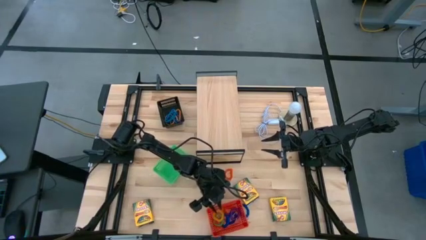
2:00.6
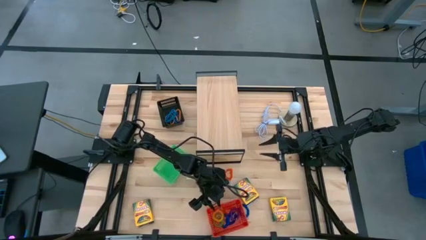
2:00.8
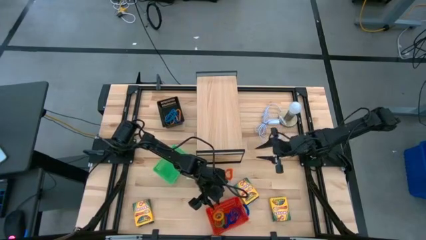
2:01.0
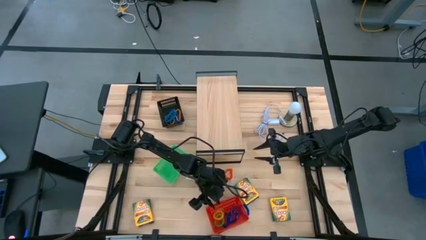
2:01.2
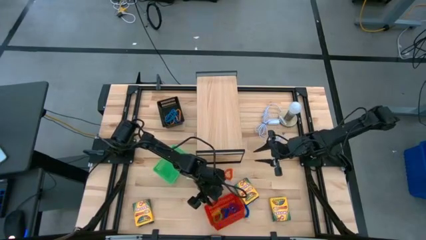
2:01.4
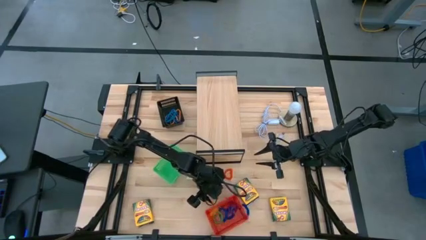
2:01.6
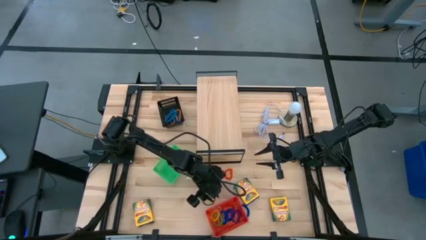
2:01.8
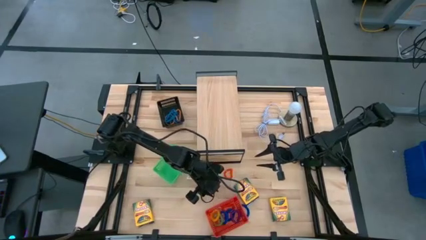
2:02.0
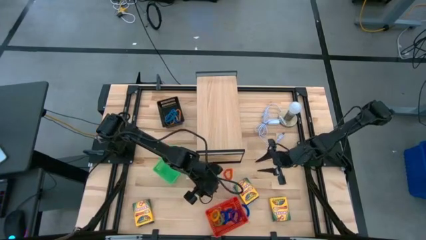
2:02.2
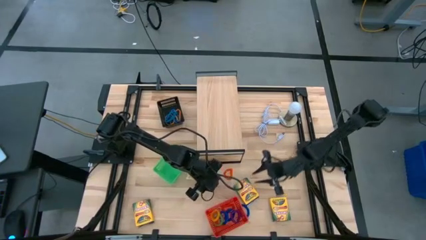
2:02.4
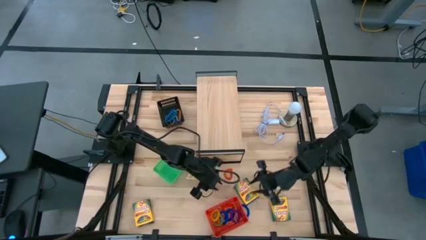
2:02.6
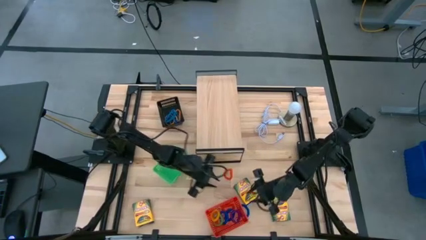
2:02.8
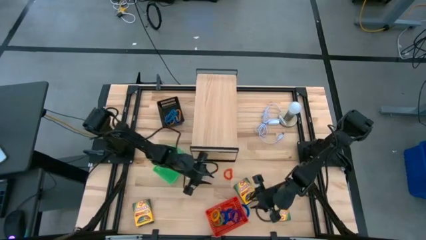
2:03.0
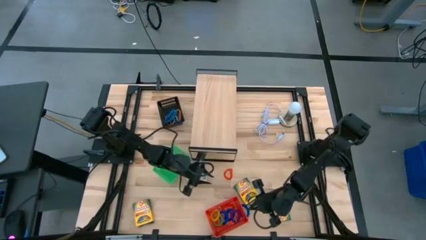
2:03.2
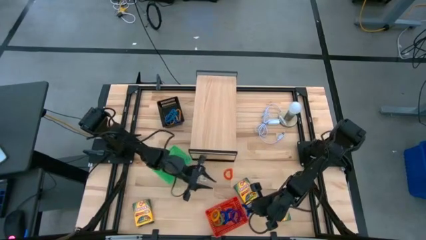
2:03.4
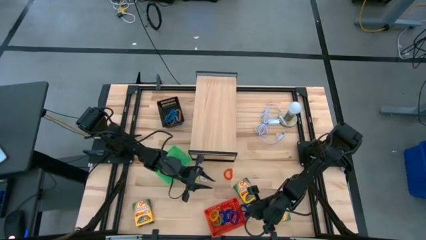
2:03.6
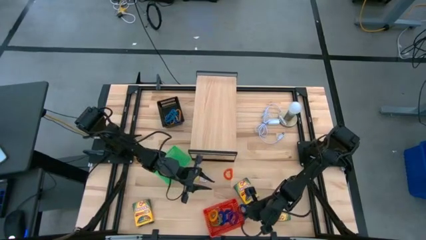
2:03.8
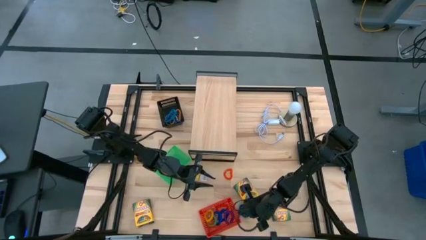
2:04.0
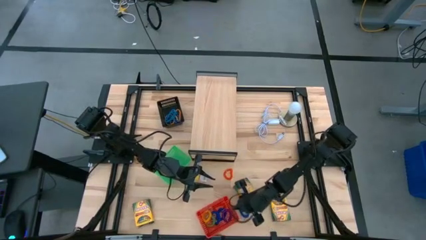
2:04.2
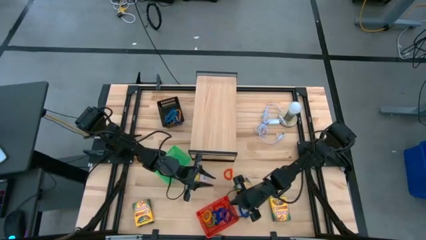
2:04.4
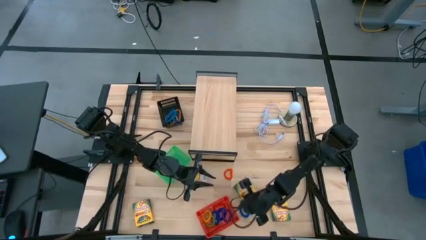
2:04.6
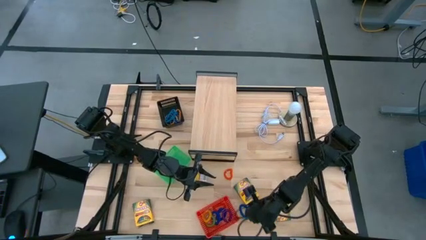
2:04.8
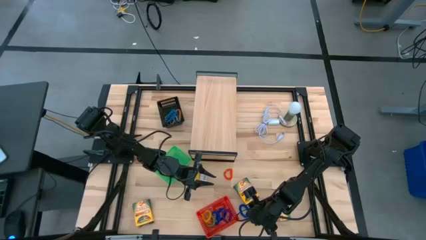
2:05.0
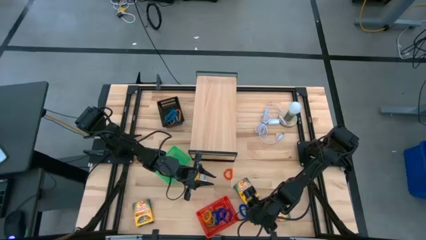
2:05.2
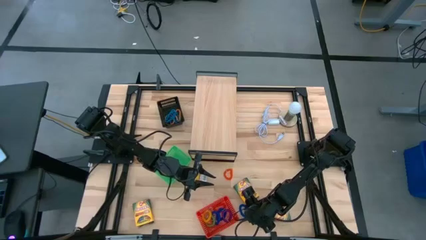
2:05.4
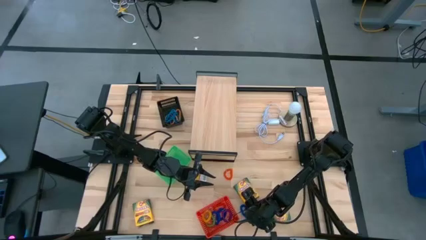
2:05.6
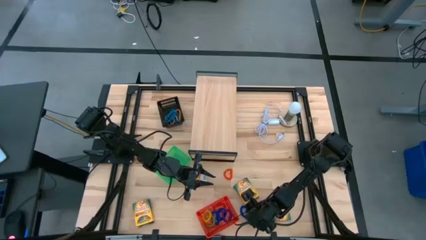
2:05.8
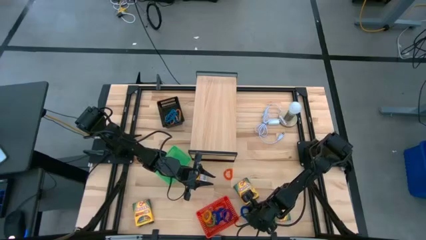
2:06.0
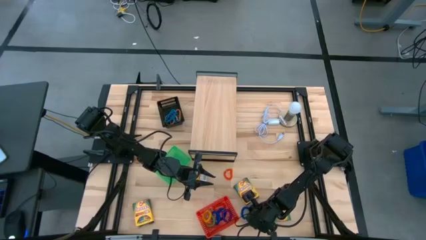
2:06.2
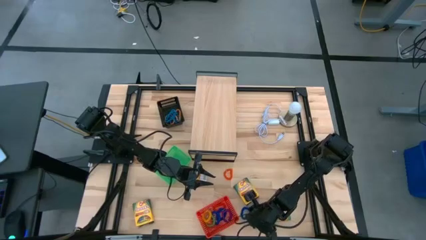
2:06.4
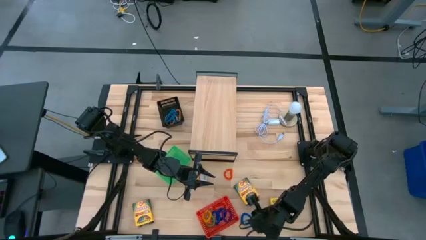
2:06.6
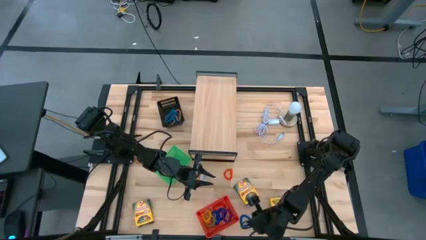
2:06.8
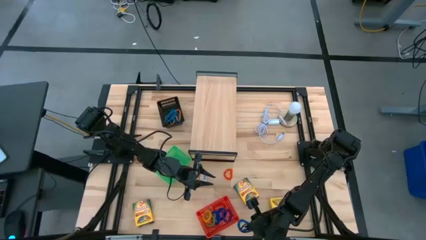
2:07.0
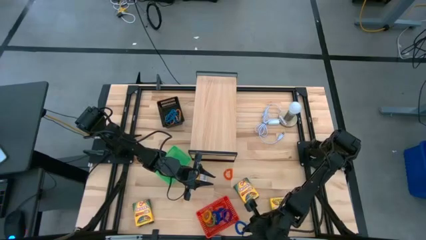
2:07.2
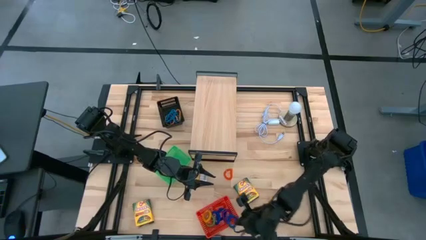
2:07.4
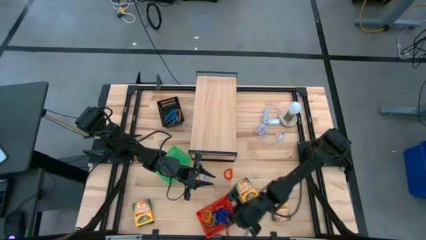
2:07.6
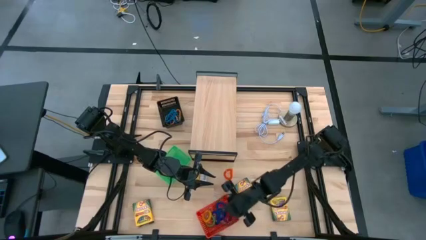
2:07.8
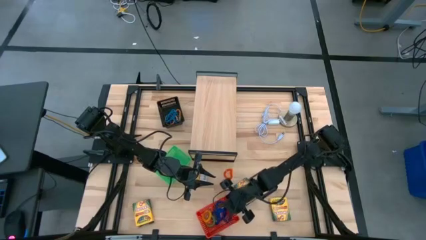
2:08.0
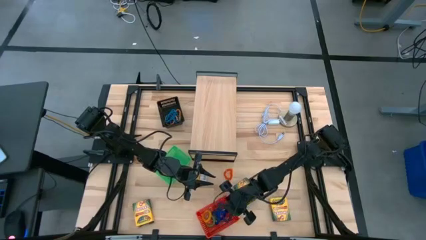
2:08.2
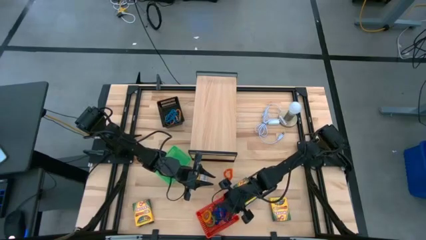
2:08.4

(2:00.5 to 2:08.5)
Task: Pick & Place Office Desk Supplies
Put the blue spring keychain into the red basket

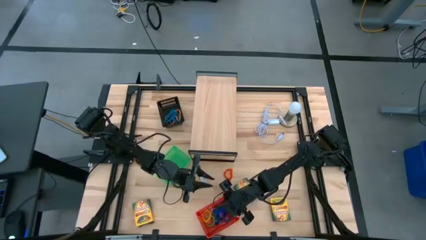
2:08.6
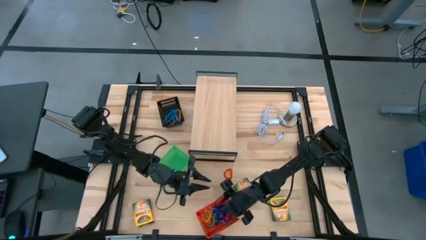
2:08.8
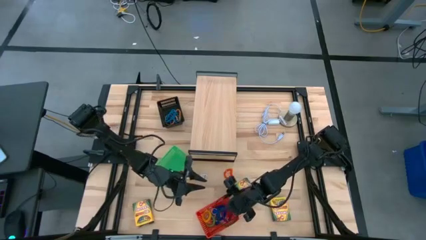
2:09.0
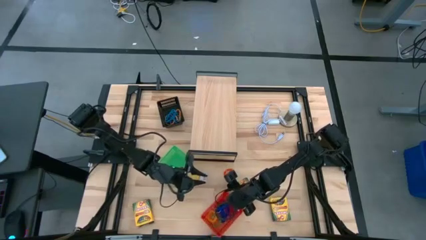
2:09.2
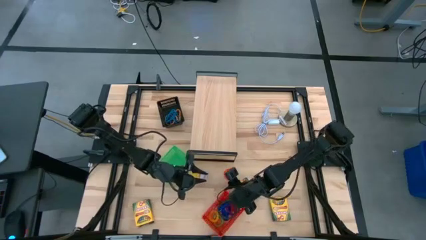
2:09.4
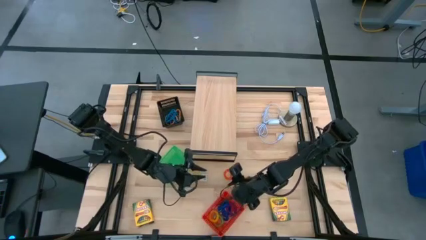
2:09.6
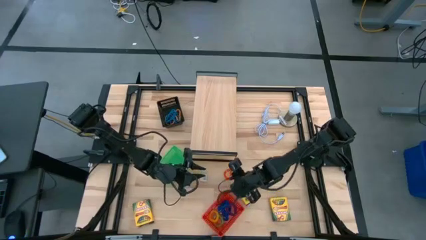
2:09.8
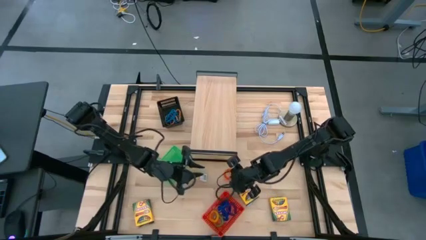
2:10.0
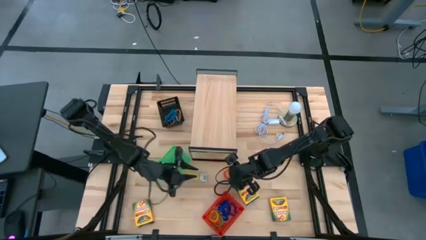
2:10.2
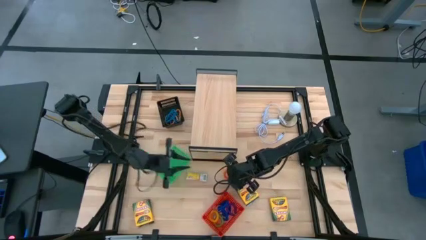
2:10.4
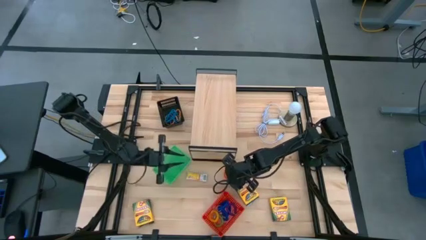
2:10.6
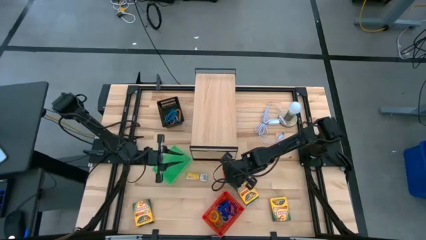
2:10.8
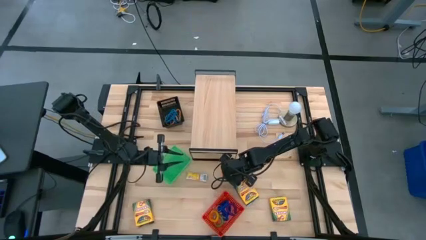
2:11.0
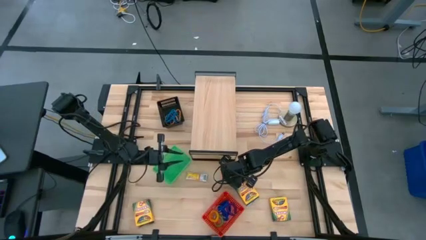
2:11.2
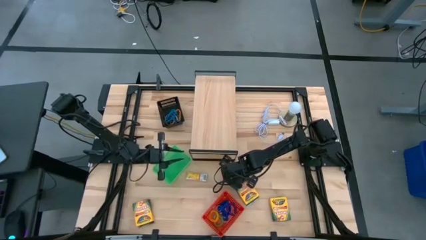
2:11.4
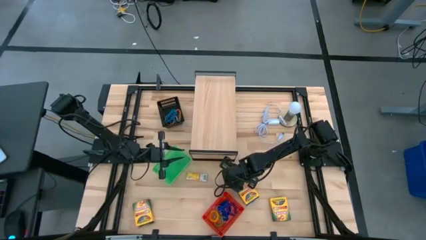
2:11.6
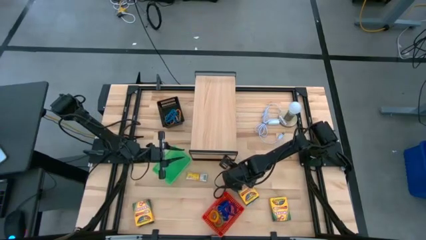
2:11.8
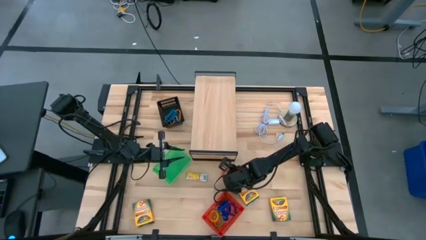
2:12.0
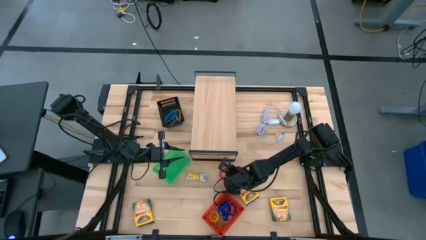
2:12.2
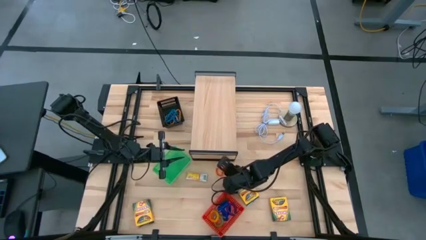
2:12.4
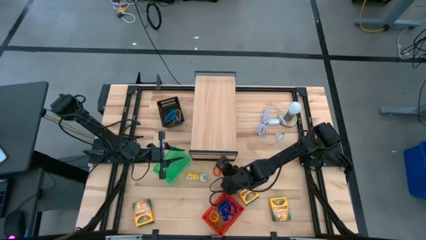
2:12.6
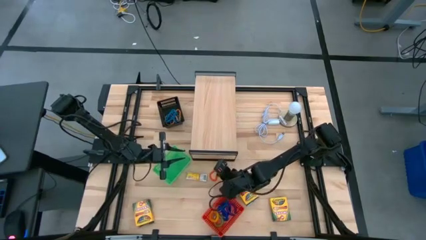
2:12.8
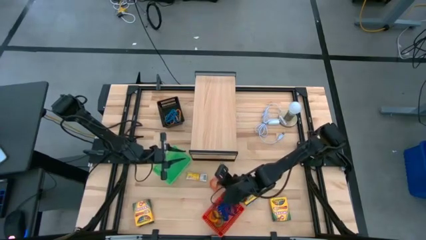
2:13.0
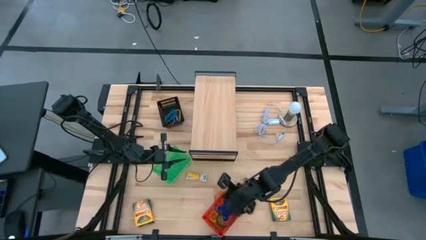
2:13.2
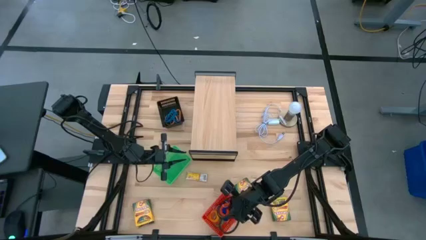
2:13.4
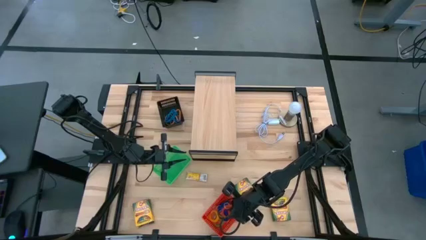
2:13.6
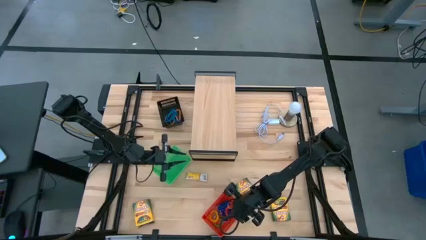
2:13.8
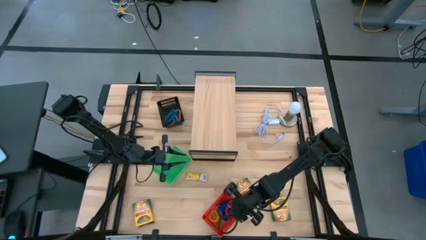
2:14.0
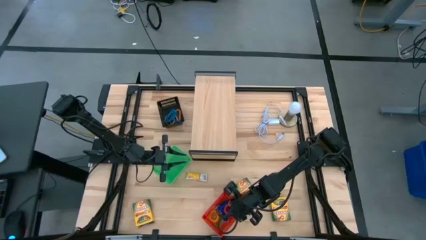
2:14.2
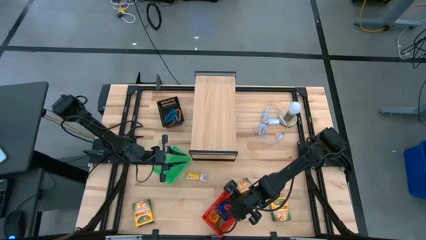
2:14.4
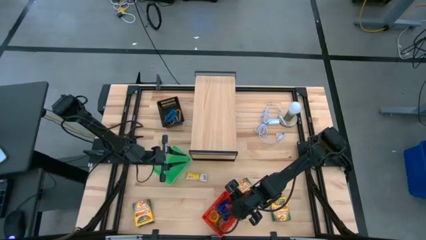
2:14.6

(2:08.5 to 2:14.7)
Put the orange spring keychain into the red basket

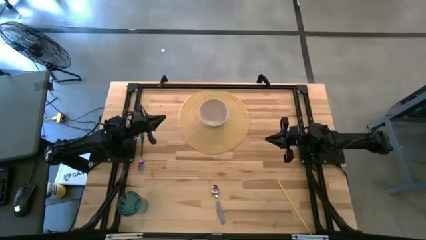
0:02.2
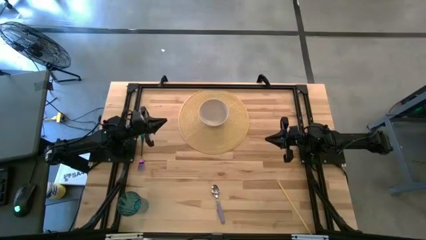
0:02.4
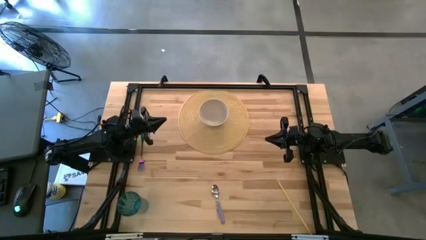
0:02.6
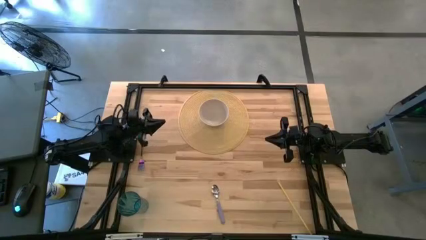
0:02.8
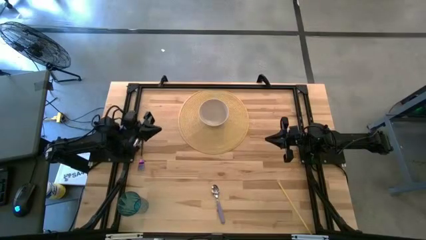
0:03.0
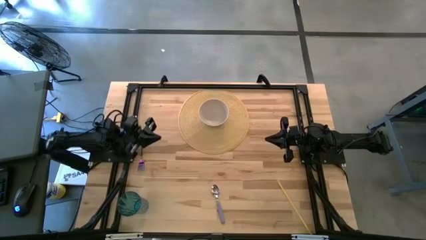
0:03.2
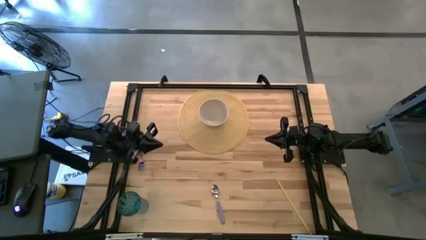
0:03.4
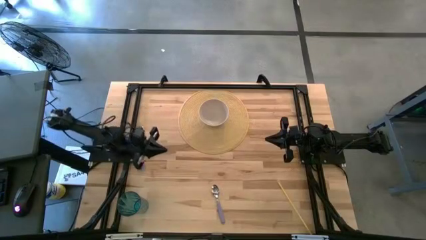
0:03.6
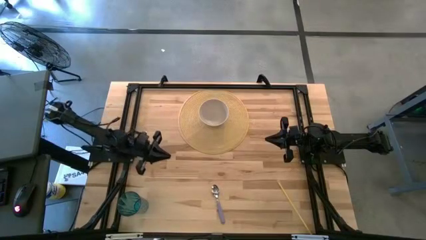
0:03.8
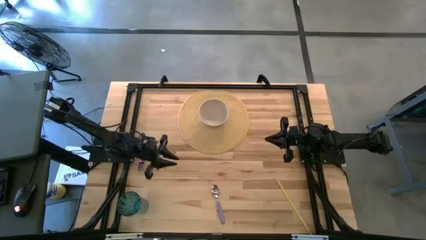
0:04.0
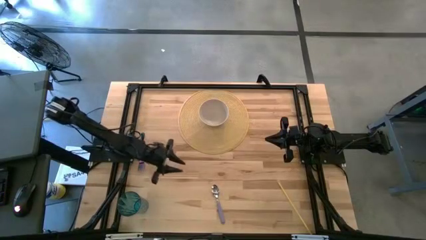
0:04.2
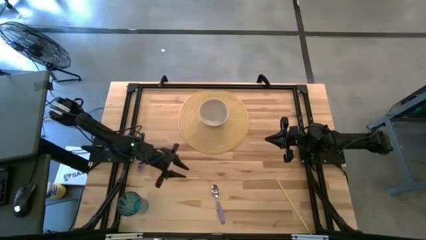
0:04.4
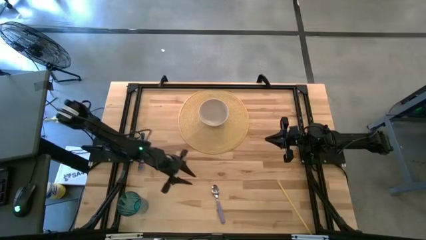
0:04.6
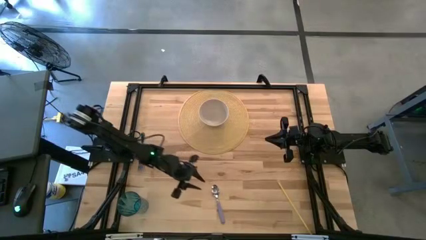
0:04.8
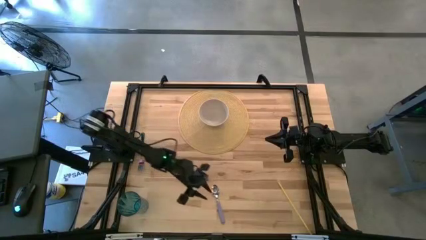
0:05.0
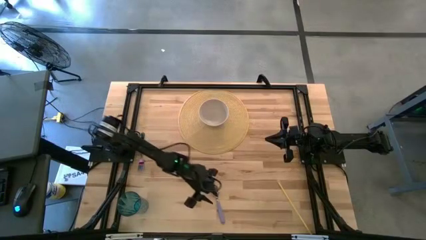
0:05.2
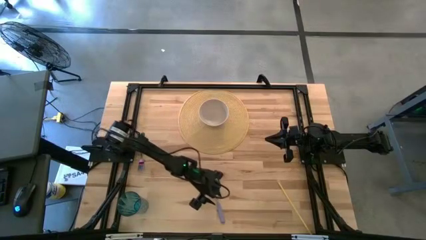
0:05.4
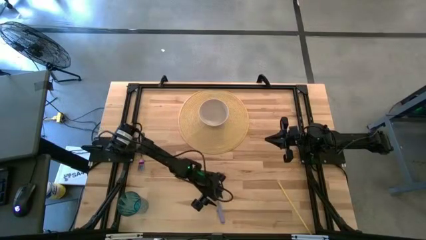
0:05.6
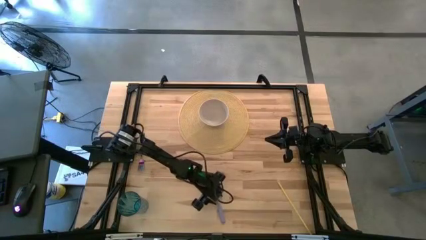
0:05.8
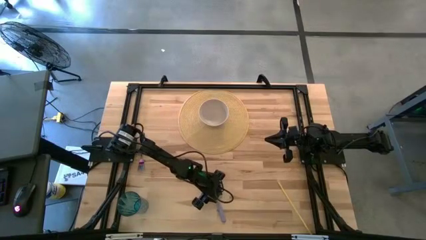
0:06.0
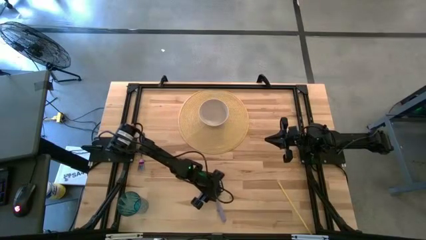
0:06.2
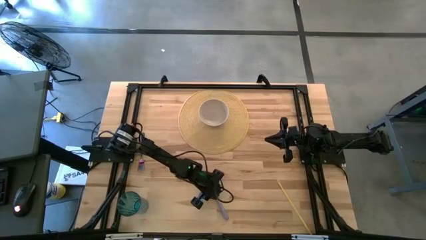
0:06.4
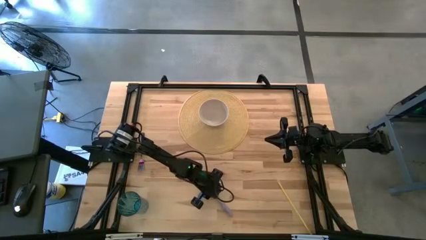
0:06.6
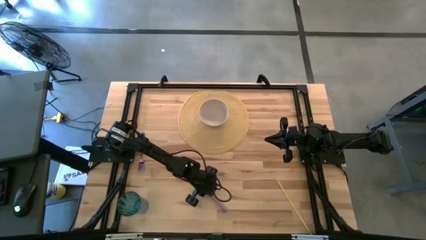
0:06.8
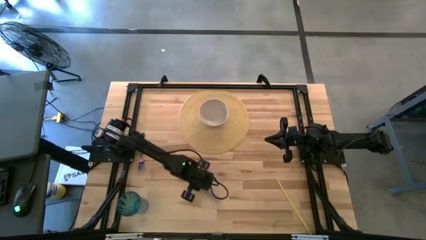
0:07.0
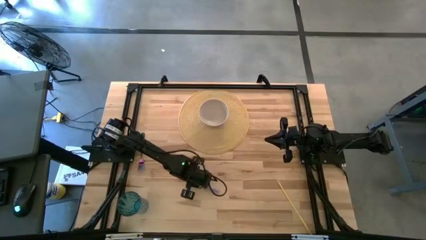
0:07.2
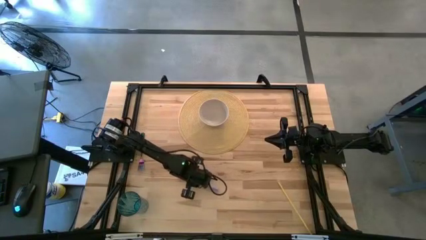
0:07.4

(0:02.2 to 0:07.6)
Task: Pick & Place Utensil
Put the purple spoon into the white bowl
